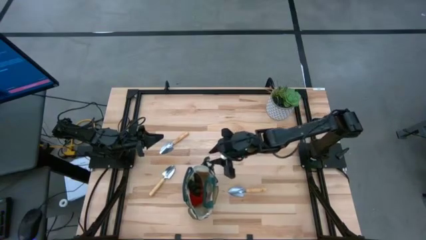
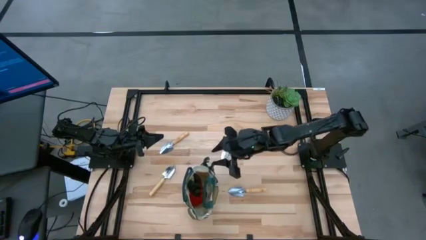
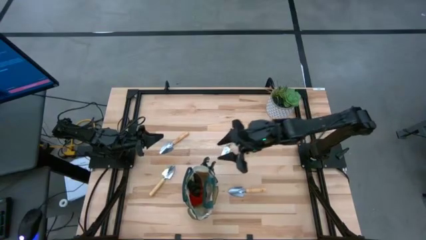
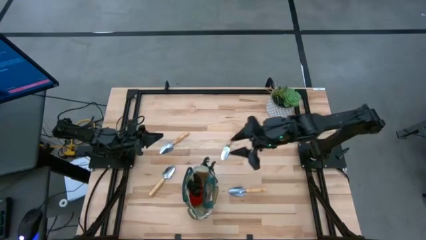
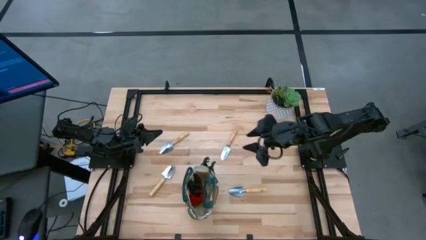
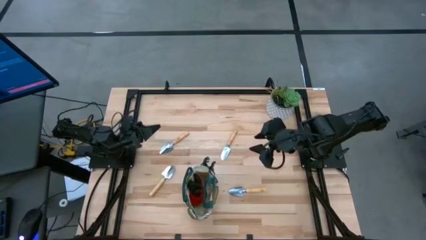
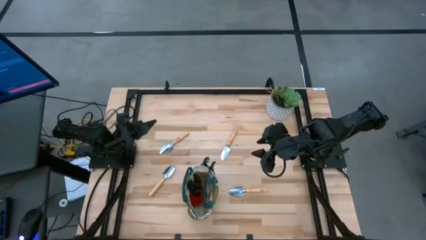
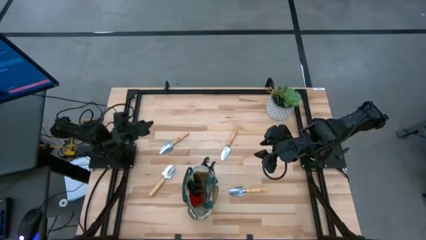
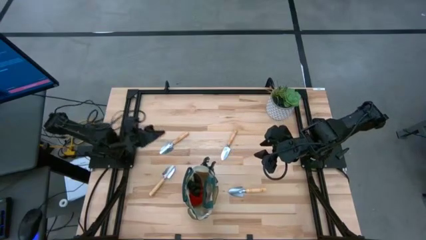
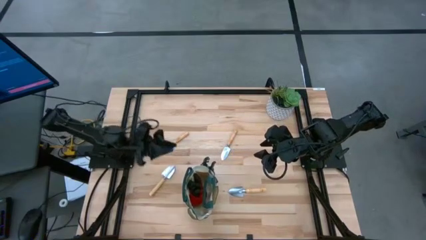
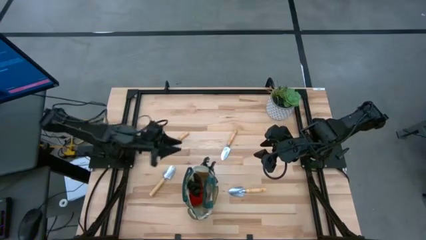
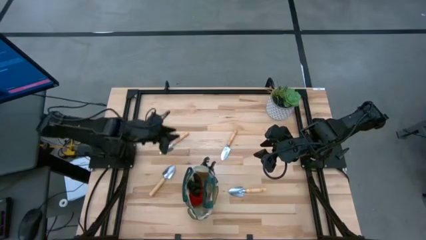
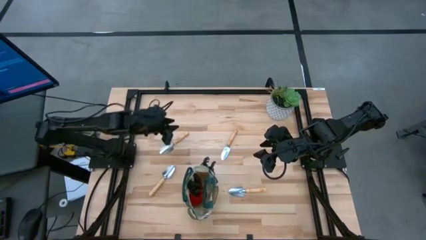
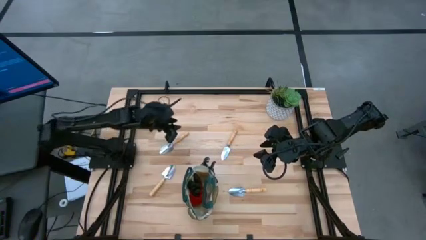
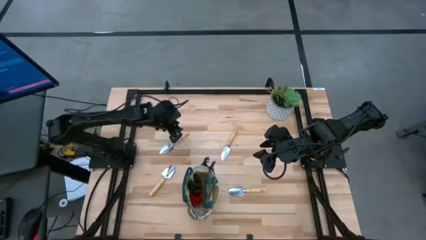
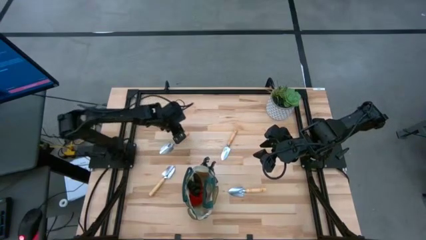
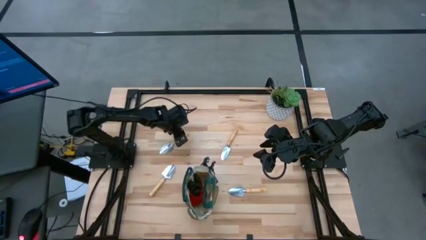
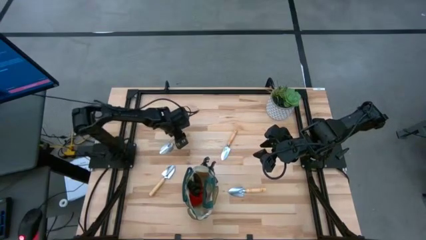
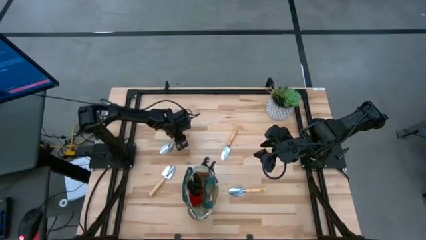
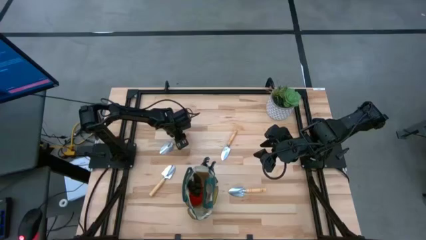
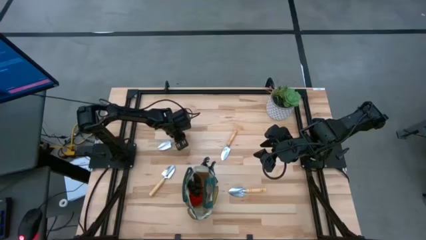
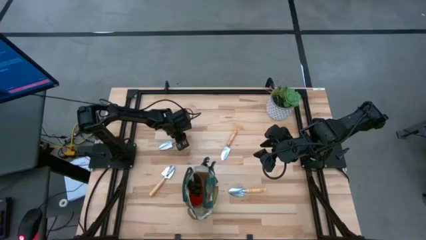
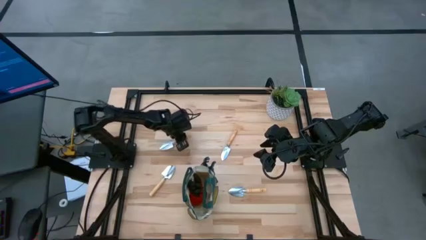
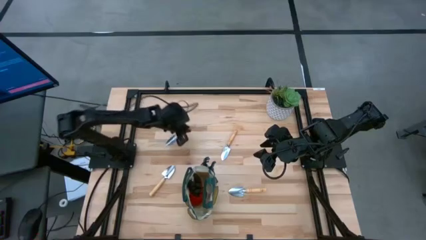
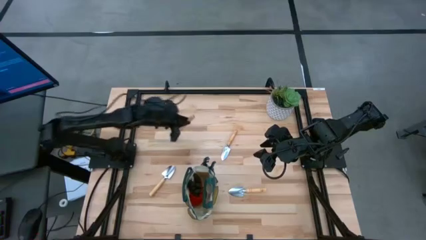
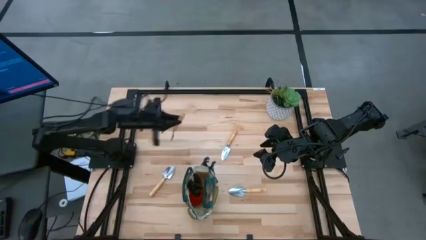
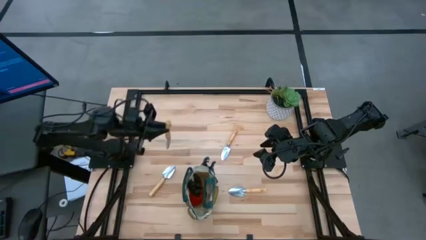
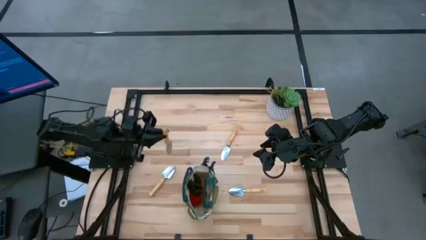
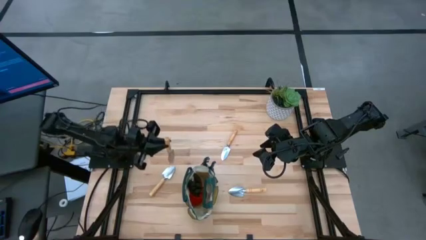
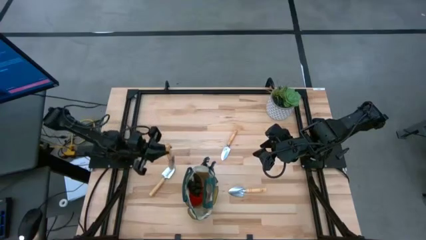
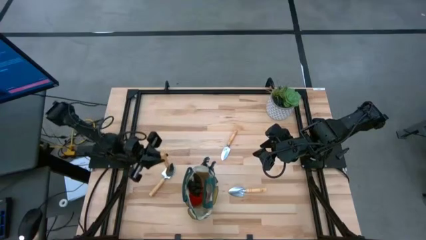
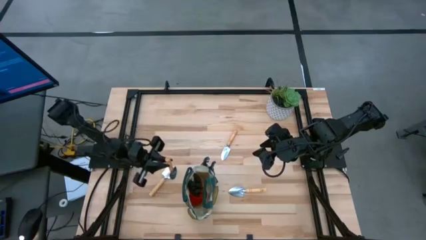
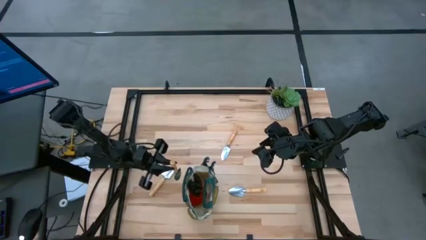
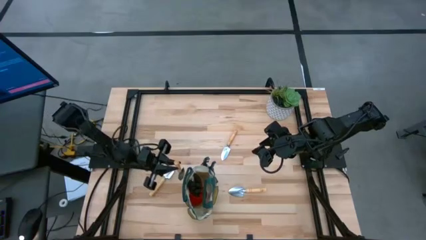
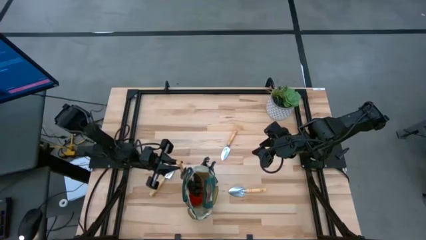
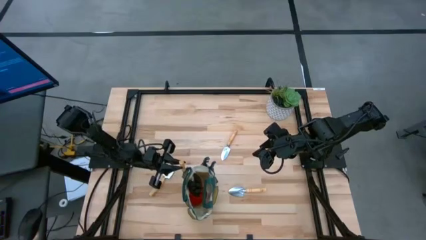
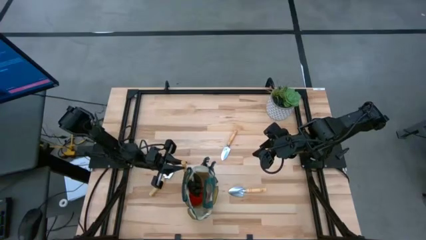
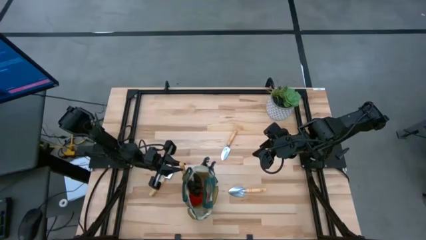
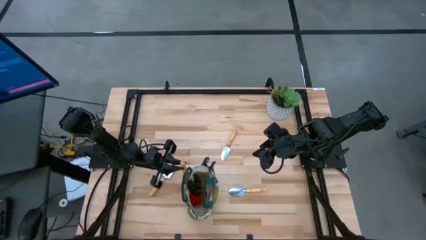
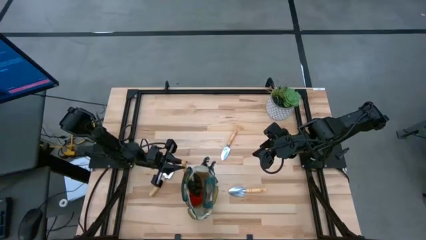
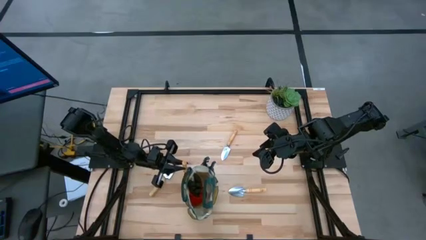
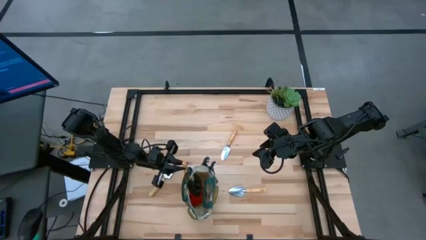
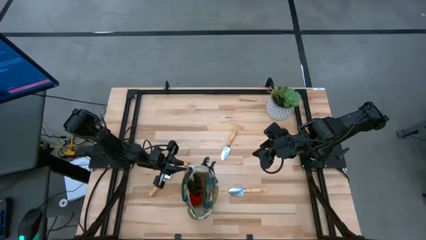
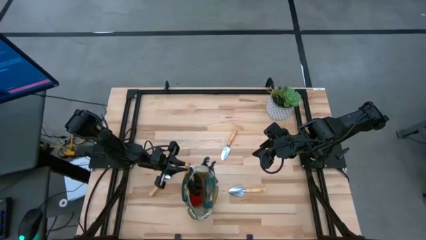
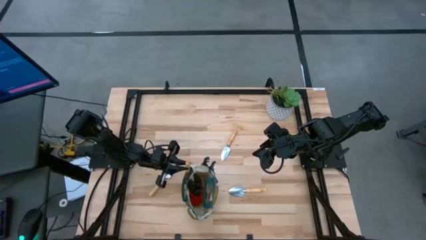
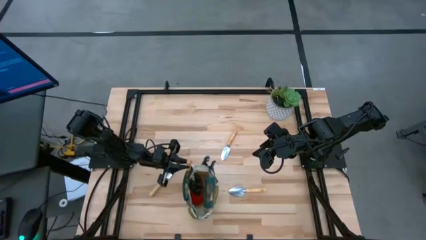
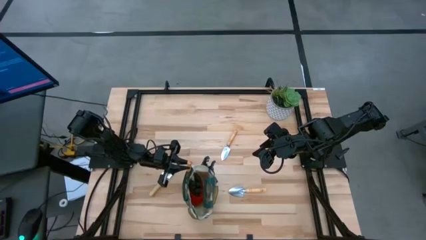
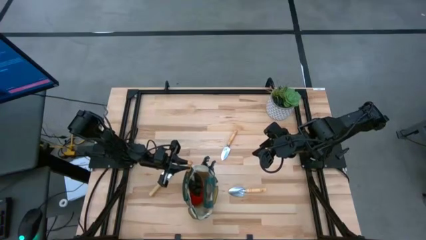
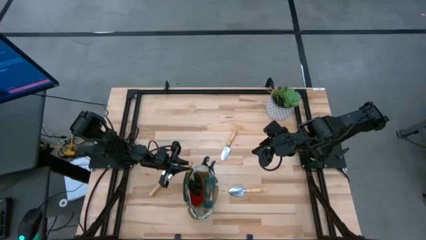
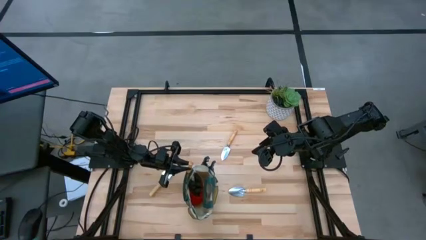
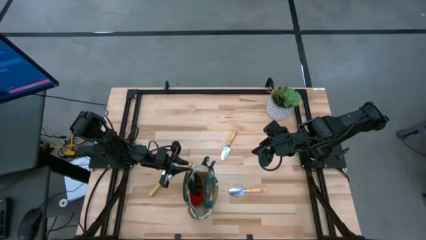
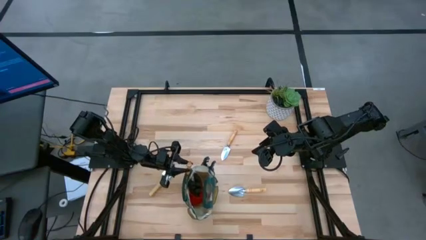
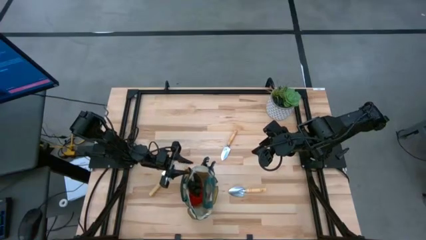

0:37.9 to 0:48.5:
Task: Pick & Place Garden tools in Gardening bag
Put the brown trowel into the gardening bag
